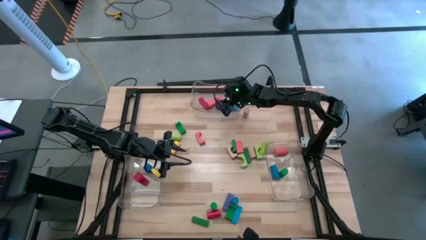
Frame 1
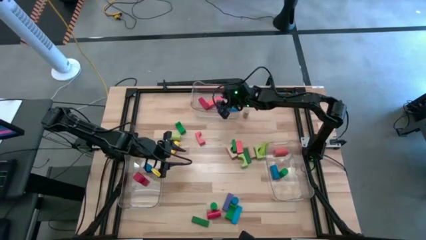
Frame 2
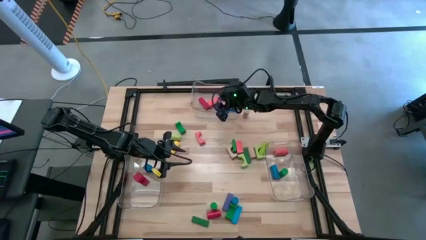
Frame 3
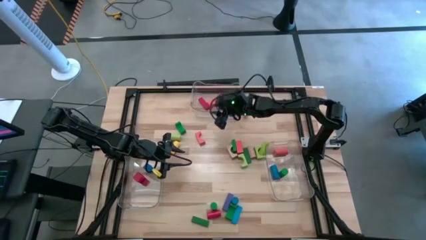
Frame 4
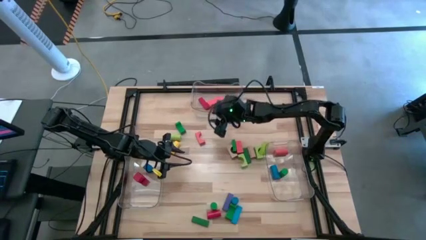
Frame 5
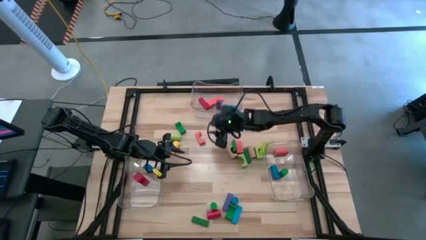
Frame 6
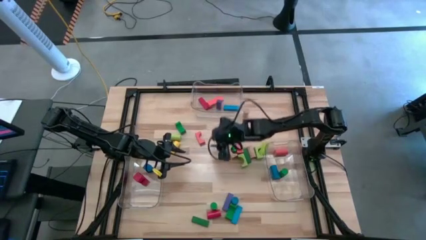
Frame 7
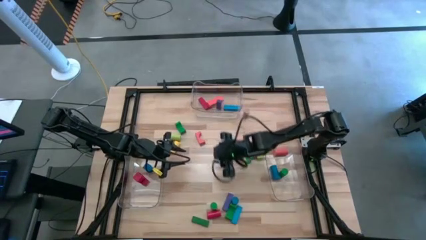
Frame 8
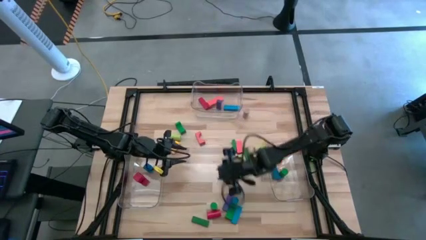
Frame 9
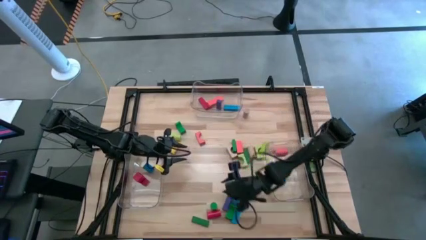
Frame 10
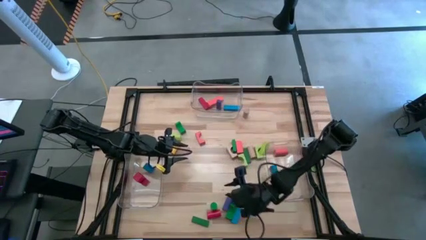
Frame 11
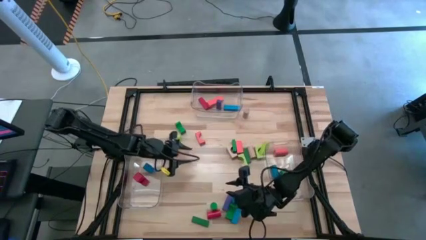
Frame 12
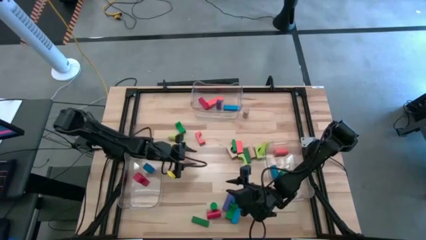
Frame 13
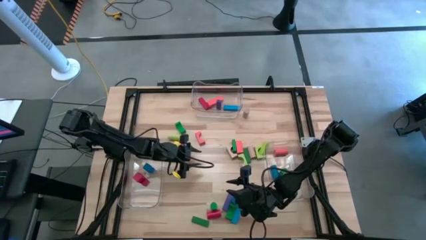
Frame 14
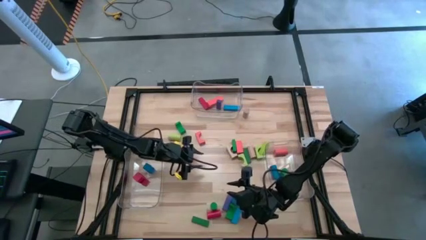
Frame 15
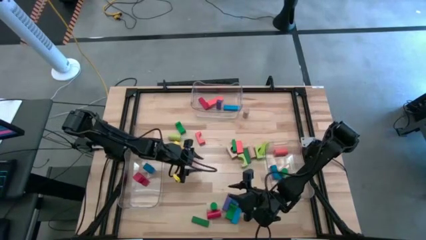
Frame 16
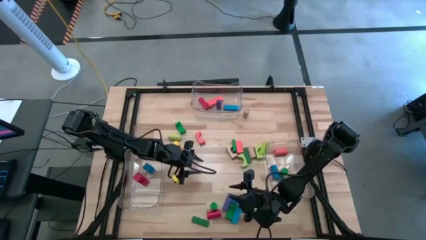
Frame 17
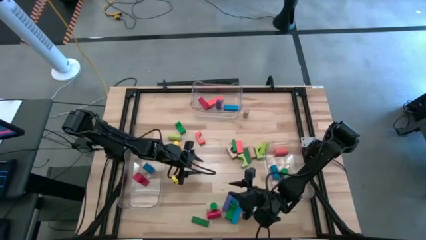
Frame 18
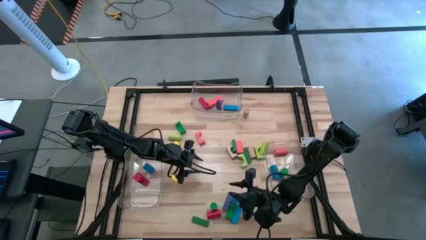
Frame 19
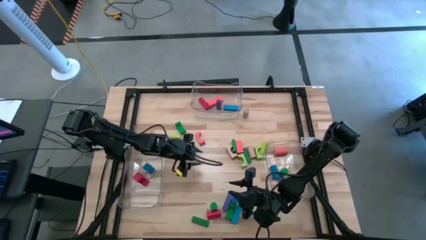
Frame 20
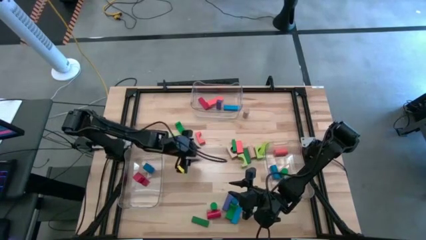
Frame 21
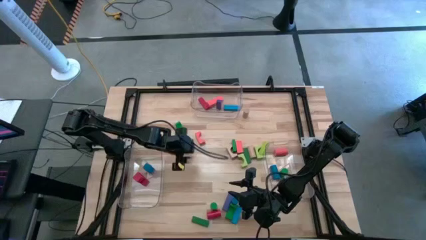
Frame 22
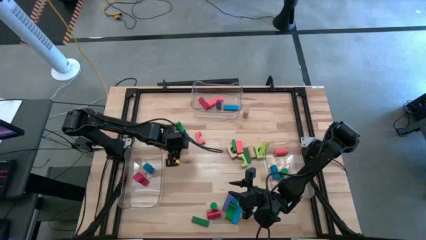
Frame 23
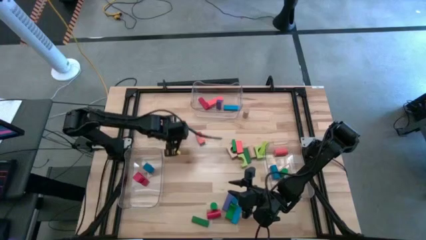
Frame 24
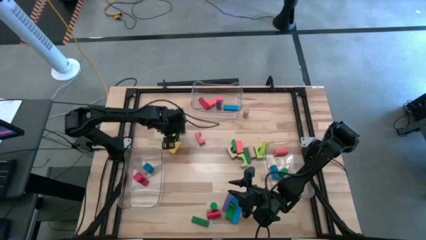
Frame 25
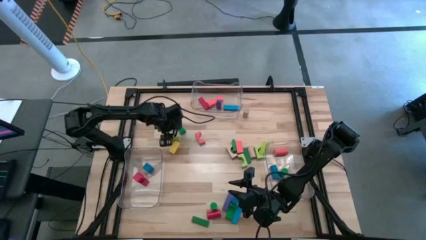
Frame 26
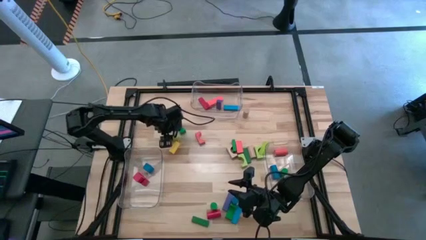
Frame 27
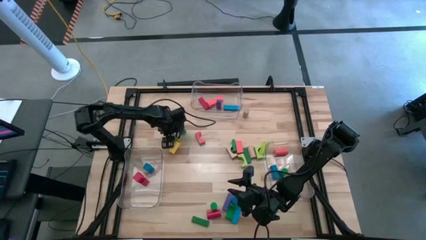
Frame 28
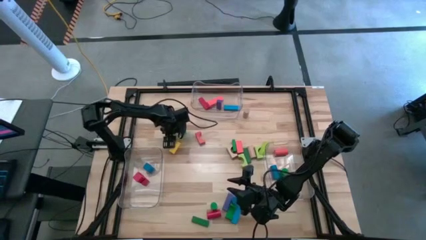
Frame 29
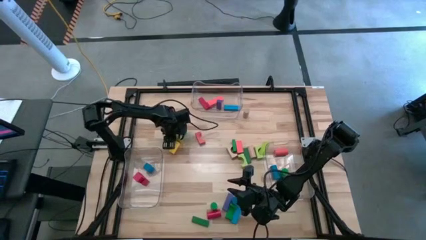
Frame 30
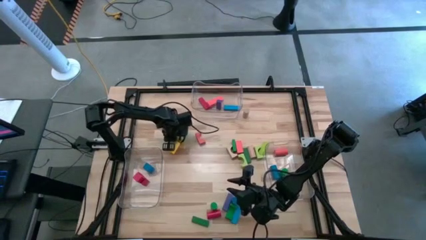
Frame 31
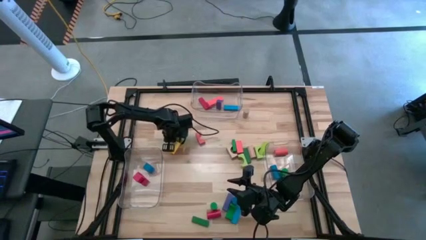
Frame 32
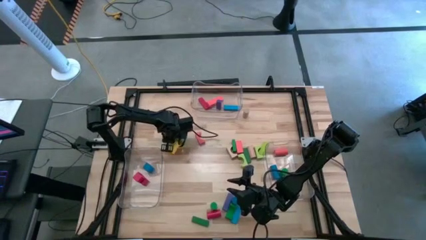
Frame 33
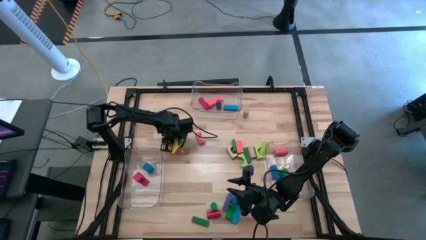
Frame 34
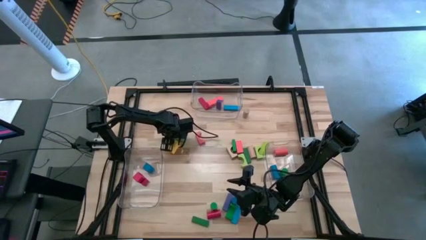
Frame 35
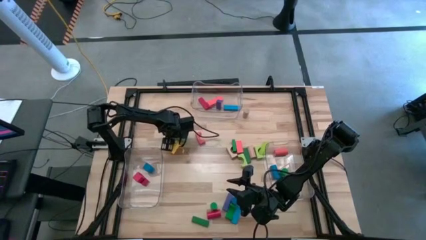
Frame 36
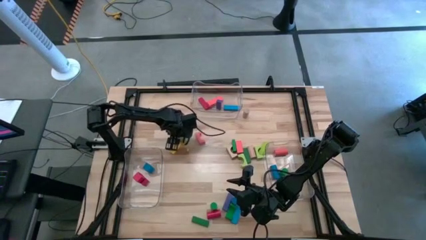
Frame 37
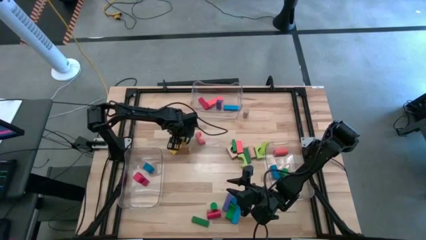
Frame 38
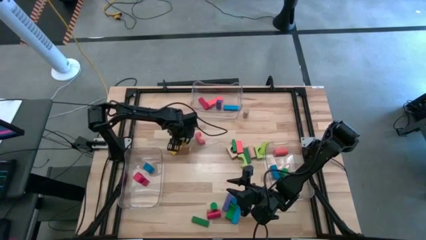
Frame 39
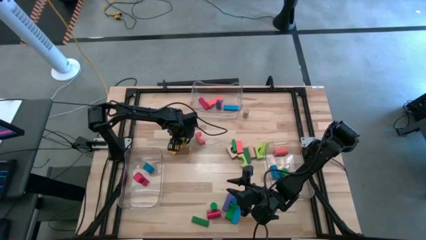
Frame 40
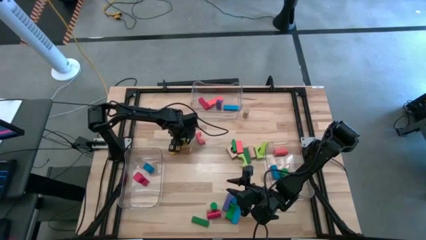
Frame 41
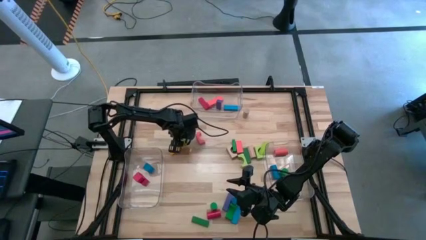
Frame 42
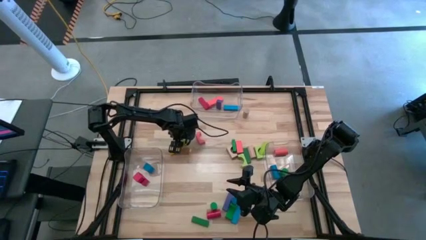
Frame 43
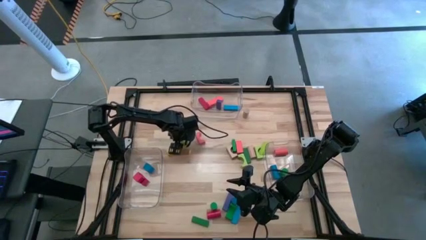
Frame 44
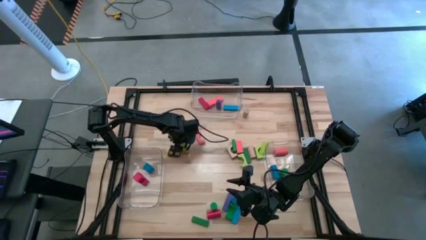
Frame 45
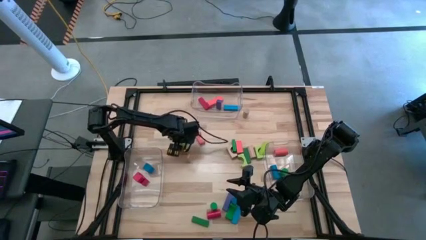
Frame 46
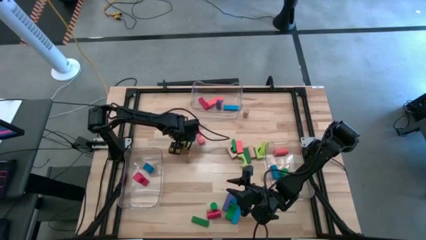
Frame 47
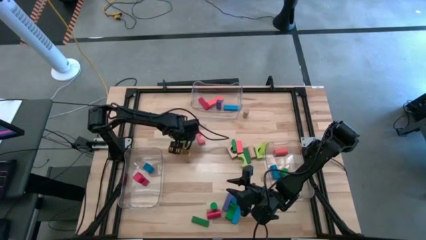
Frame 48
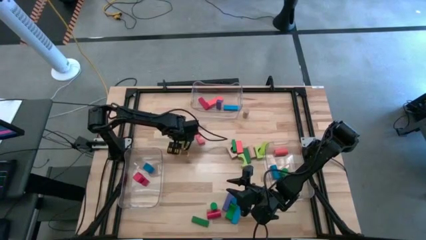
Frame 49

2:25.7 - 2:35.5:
Task: Sort blocks by size
Put the light green cylindrical block into the right transparent bin

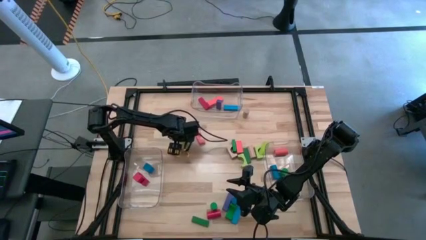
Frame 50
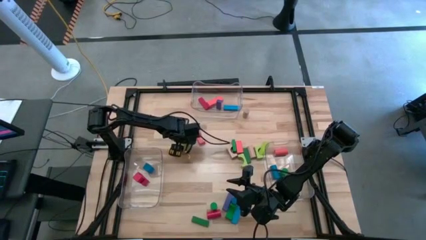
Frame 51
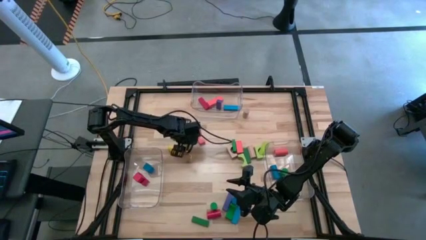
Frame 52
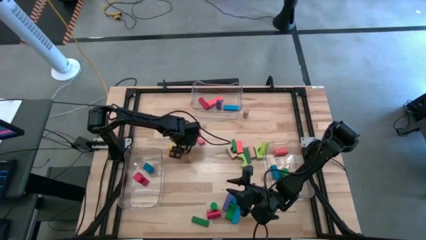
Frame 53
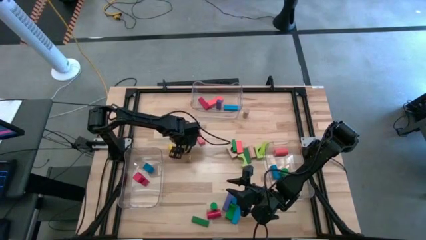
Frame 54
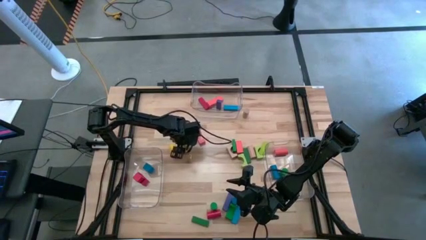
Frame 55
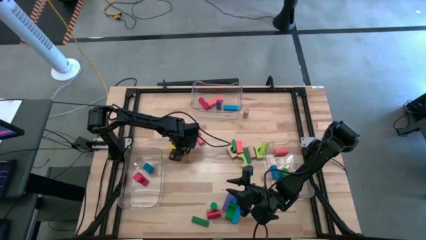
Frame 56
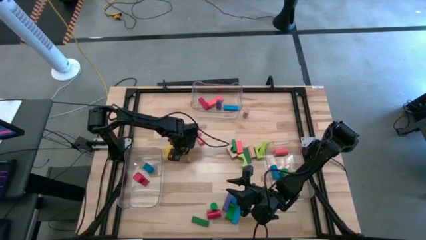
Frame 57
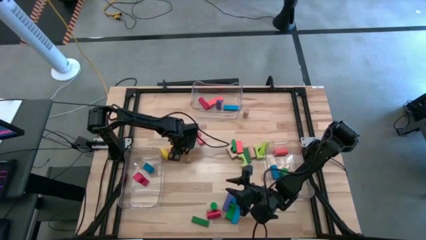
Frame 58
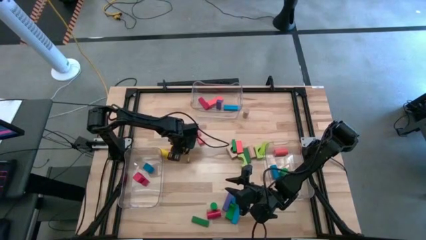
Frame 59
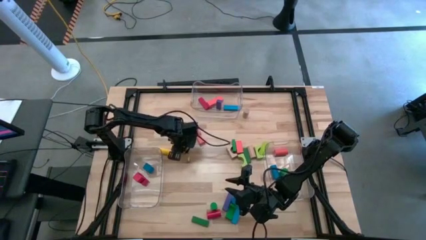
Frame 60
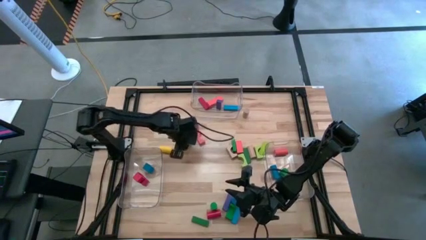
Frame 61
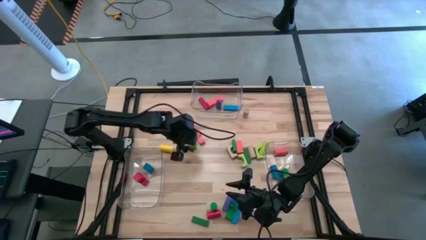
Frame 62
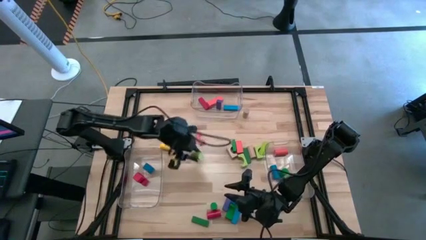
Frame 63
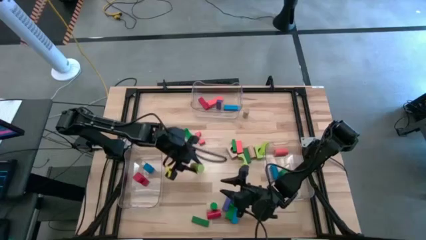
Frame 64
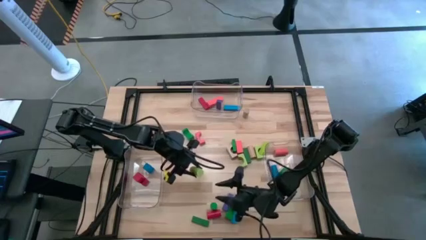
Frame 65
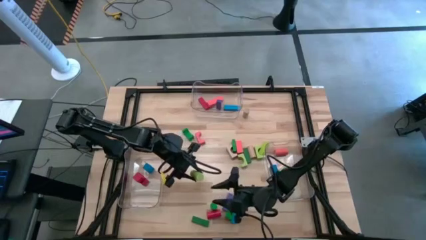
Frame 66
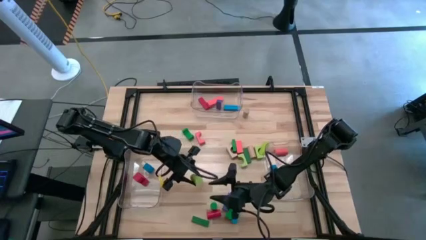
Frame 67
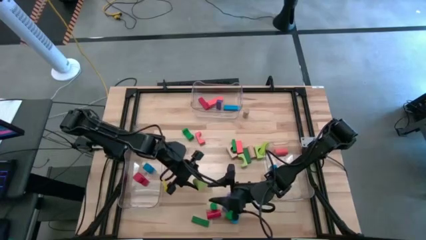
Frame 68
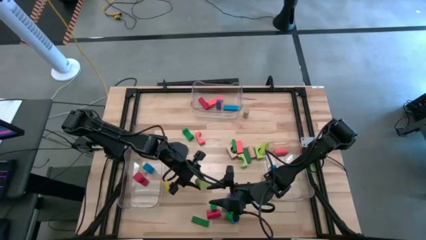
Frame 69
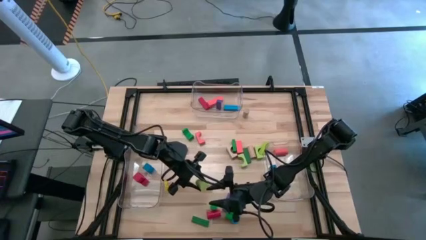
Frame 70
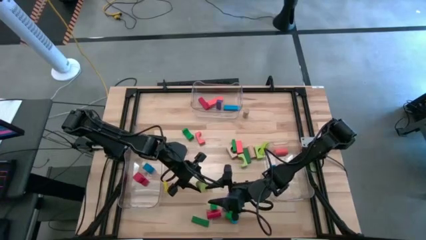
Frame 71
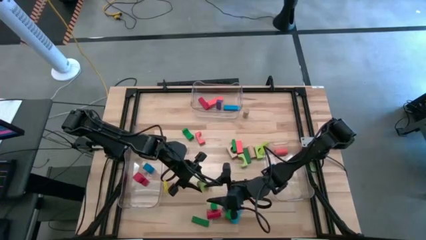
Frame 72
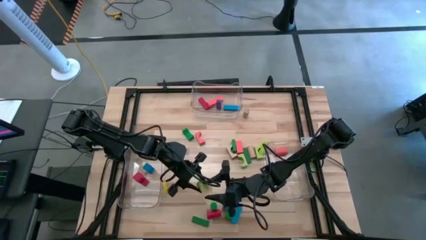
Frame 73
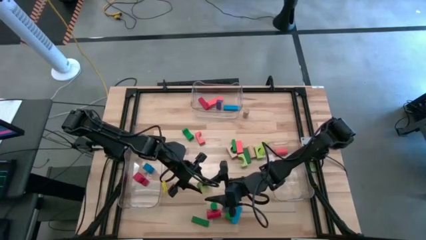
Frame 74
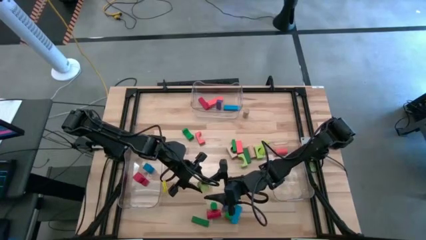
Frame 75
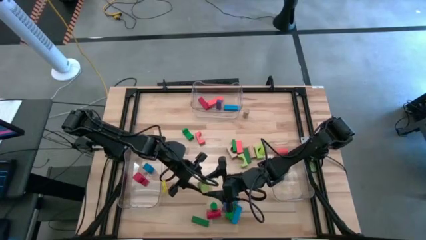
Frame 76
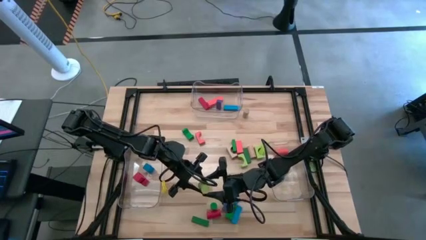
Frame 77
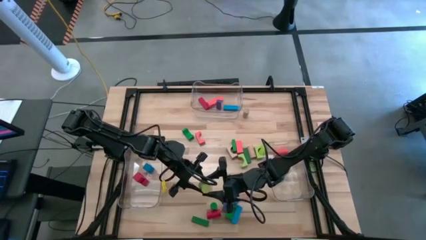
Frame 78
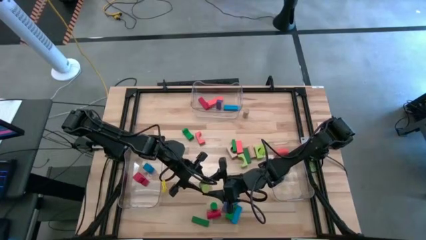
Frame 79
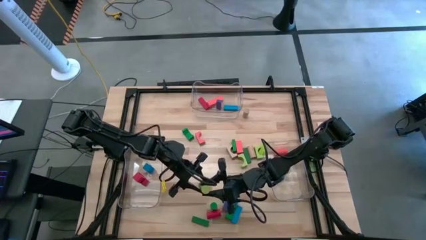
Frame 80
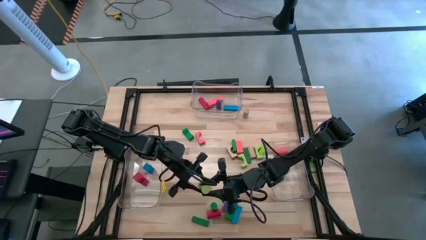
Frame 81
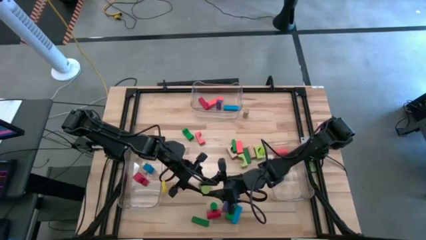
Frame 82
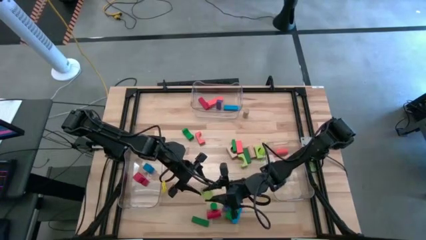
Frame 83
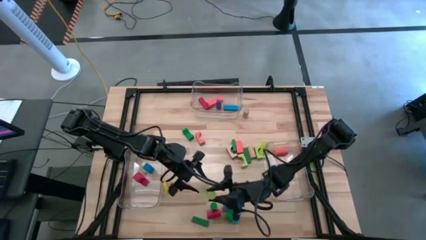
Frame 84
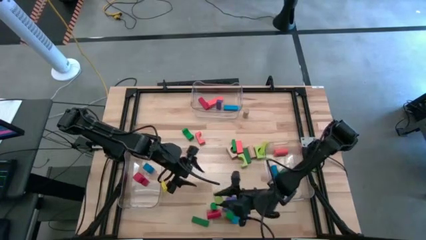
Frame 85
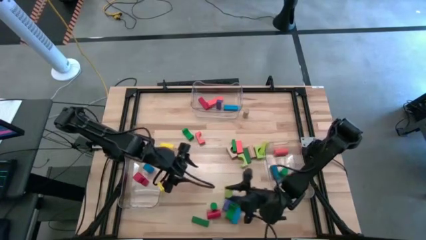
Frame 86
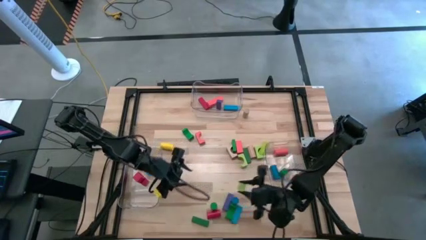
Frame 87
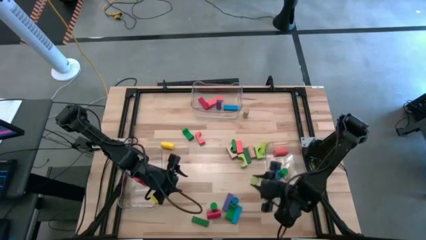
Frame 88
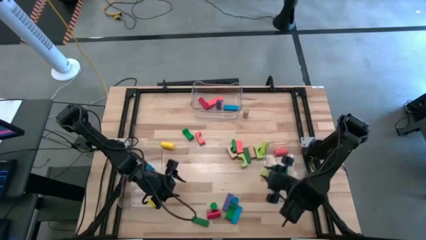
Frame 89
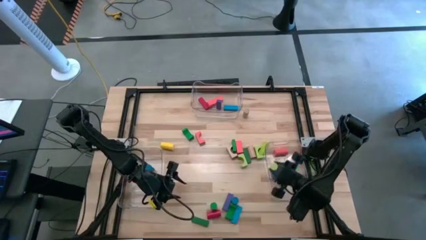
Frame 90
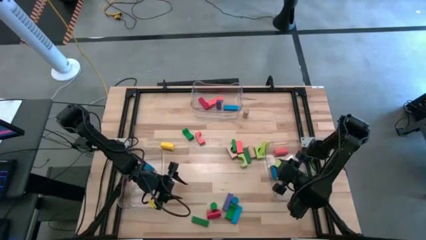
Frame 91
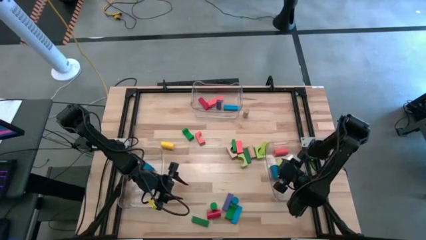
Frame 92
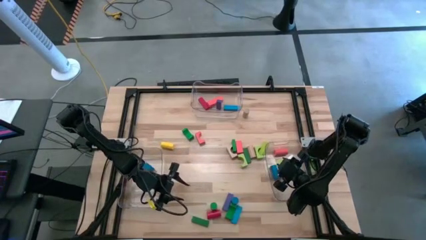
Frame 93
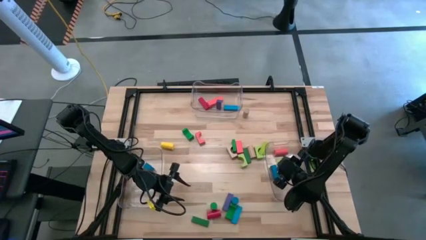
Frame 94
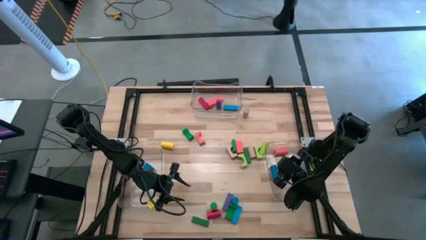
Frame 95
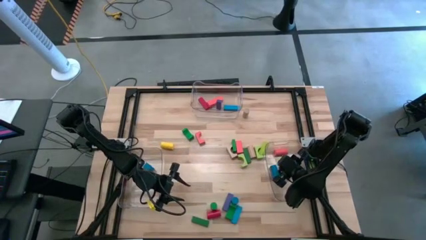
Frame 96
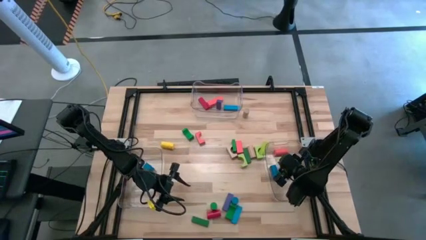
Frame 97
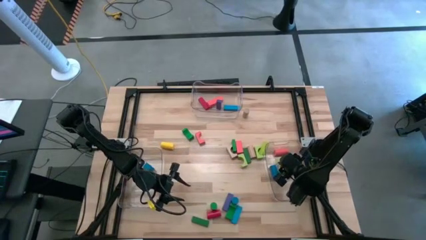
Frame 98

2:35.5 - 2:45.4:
Put the light green cylindrical block into the right transparent bin
